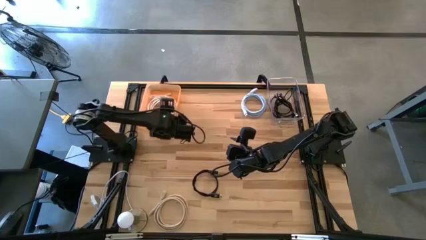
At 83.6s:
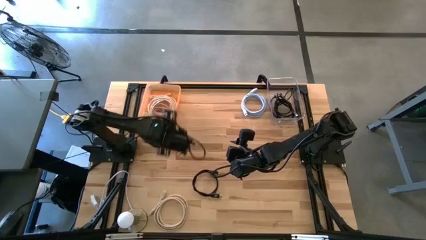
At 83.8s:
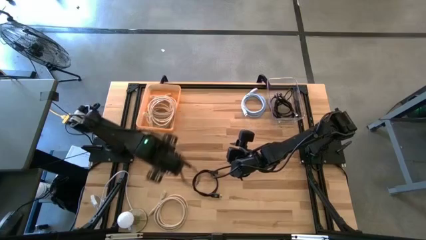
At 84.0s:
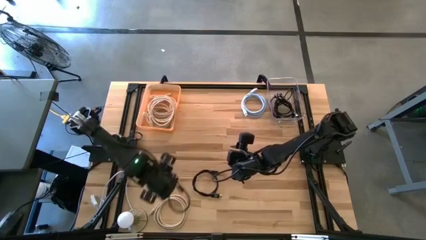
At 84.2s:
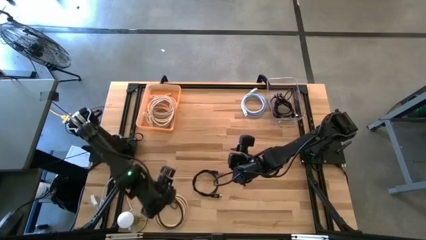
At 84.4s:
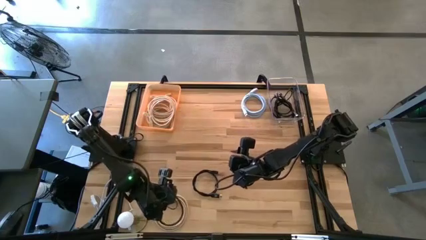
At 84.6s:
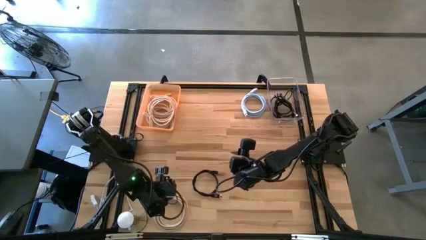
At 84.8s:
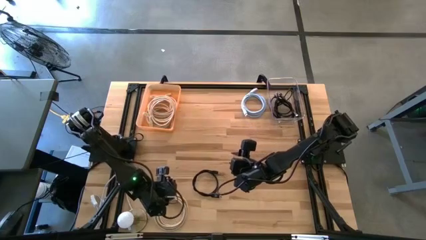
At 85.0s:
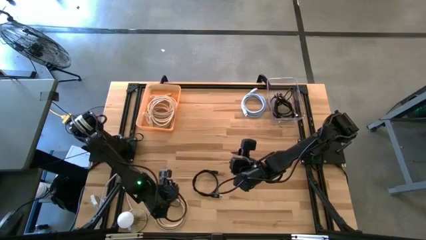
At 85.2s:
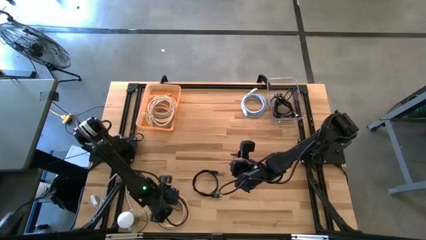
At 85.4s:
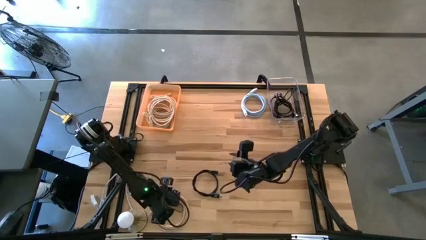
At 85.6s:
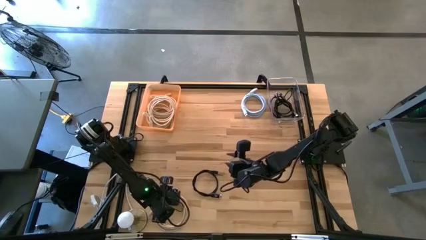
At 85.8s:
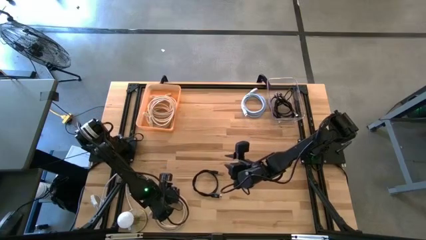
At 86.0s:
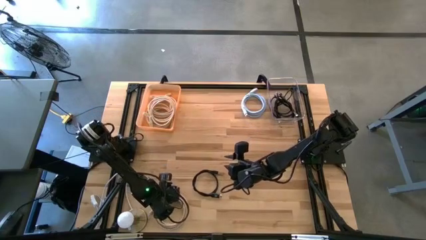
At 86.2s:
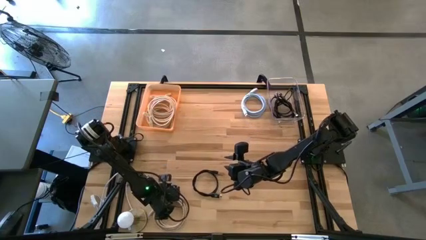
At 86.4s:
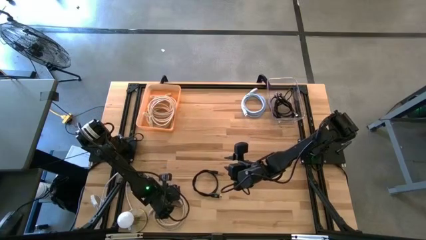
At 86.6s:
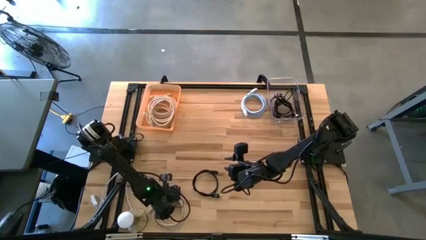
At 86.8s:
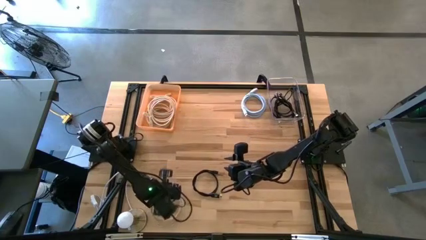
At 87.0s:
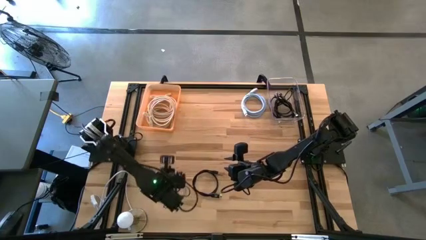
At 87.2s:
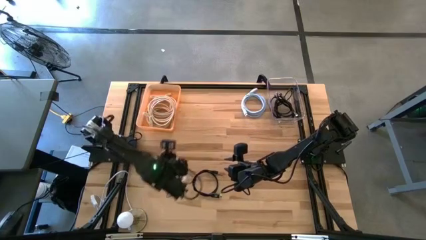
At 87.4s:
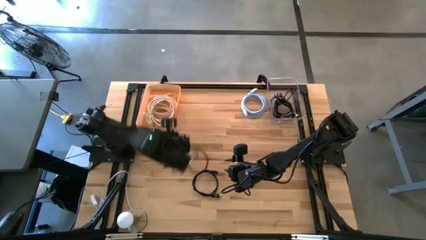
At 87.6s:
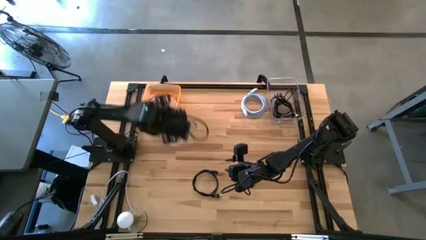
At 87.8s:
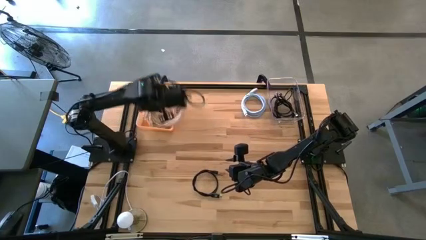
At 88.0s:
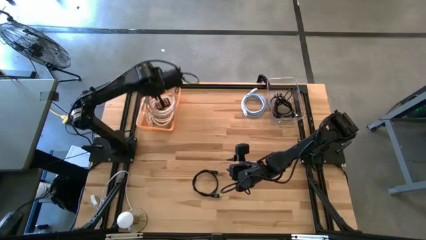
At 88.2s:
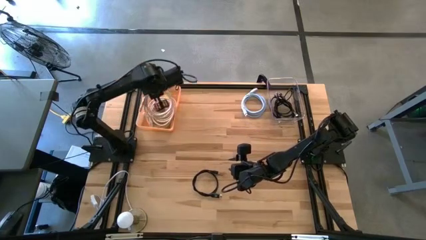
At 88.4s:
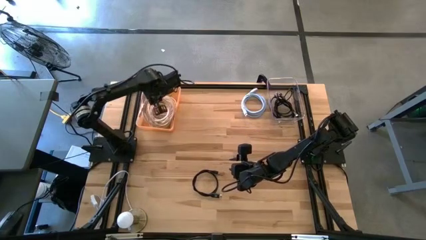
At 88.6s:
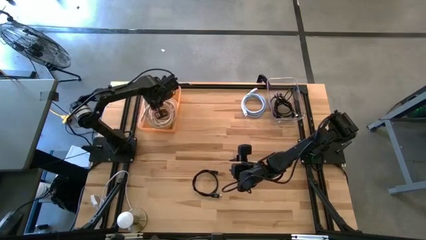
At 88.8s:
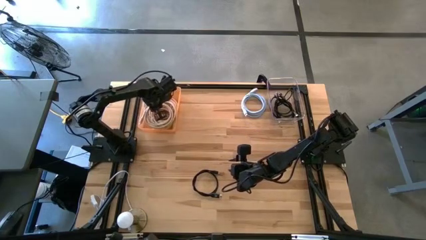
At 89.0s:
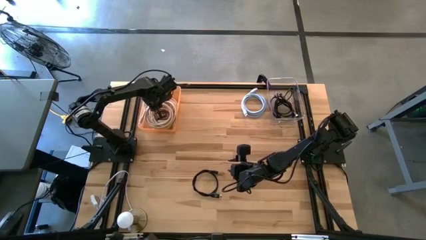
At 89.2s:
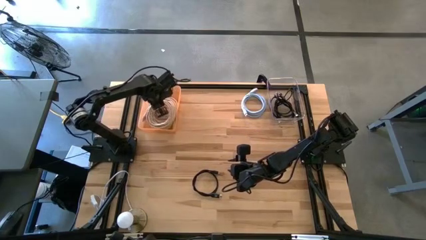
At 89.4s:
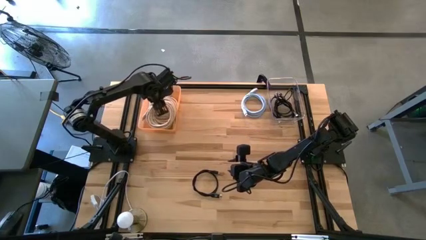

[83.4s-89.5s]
Task: Sort HDMI cables
Put the brown HDMI cable into the orange bin

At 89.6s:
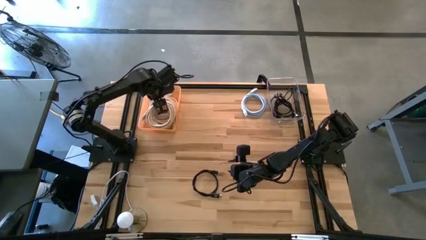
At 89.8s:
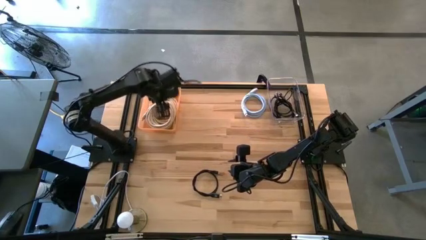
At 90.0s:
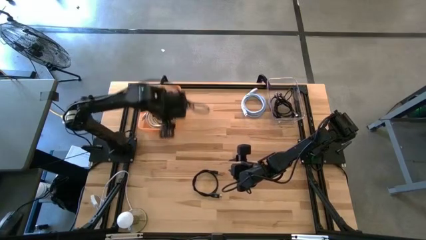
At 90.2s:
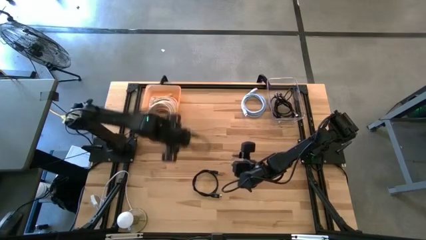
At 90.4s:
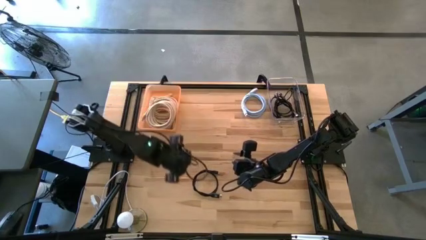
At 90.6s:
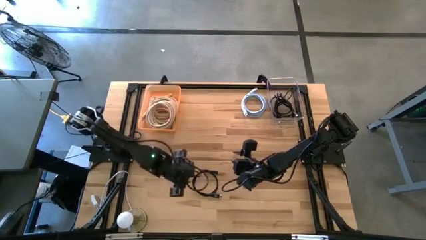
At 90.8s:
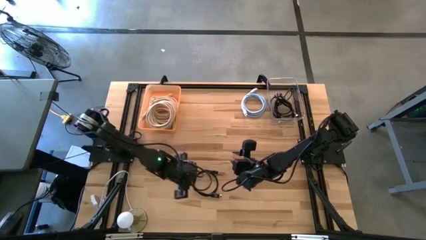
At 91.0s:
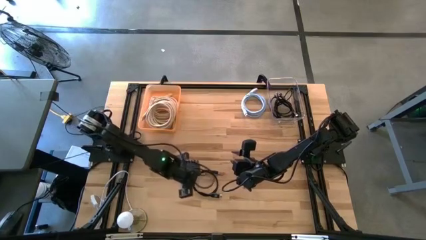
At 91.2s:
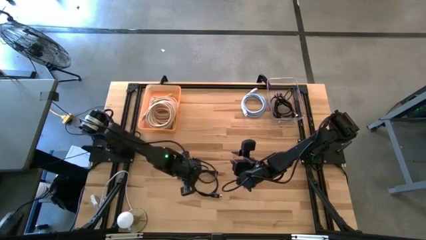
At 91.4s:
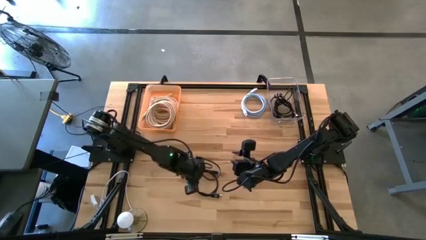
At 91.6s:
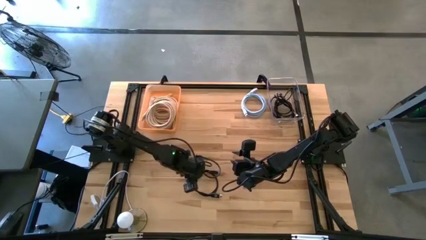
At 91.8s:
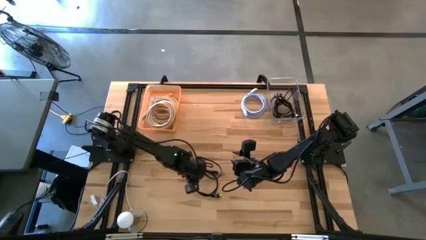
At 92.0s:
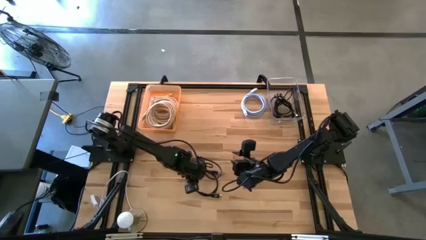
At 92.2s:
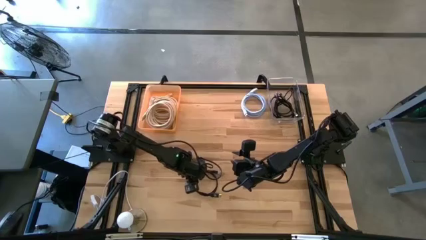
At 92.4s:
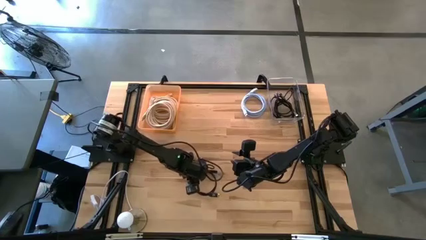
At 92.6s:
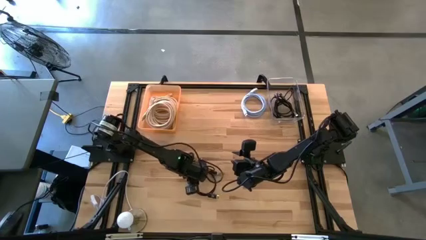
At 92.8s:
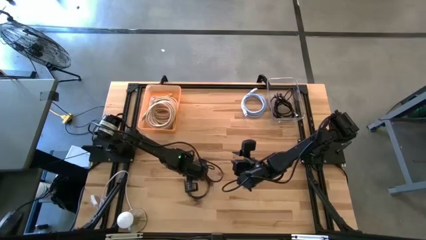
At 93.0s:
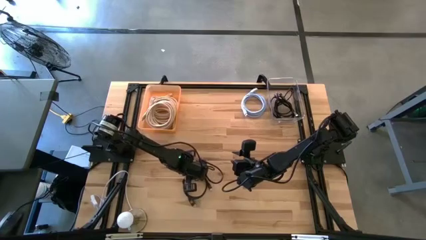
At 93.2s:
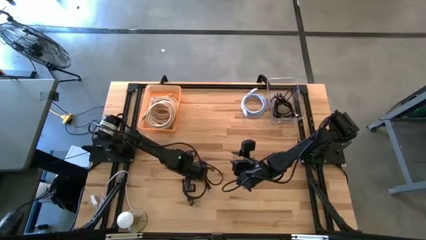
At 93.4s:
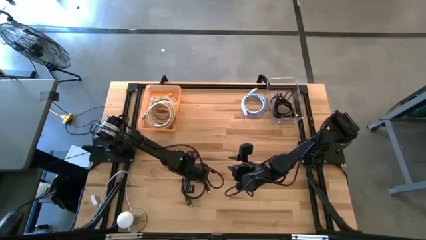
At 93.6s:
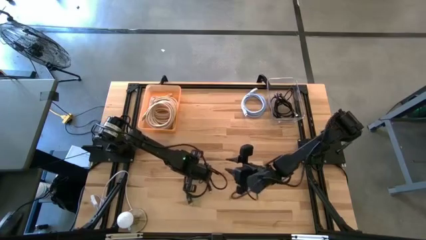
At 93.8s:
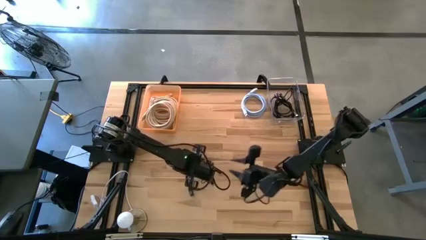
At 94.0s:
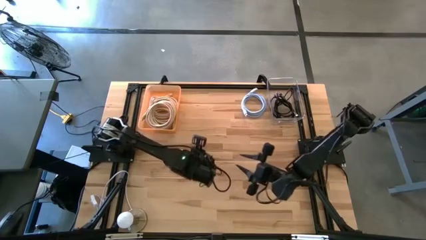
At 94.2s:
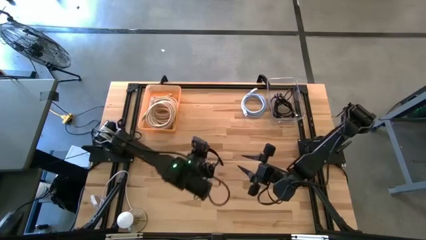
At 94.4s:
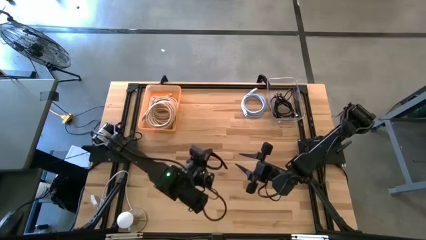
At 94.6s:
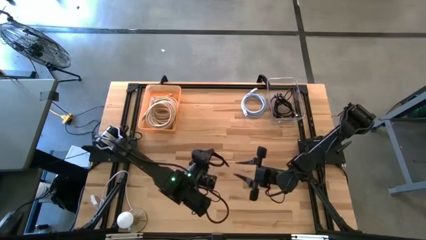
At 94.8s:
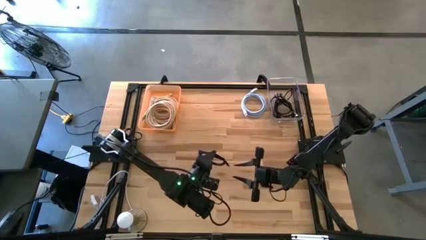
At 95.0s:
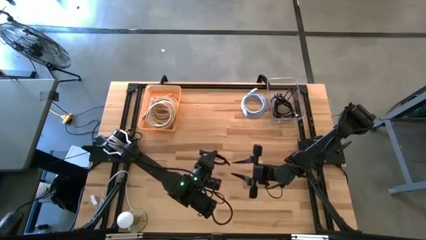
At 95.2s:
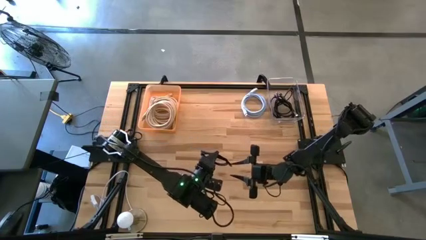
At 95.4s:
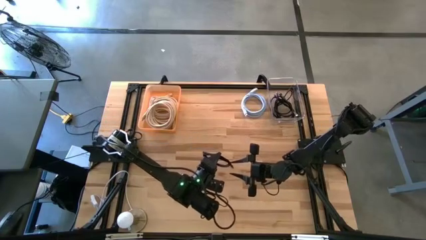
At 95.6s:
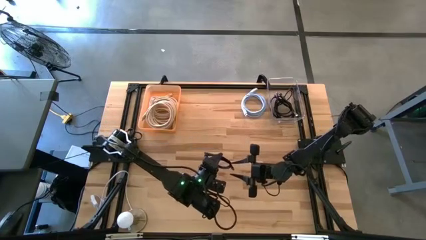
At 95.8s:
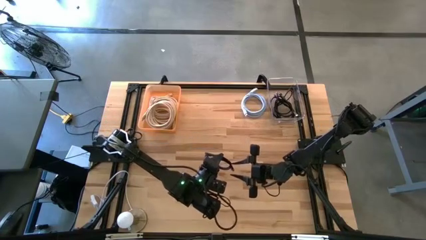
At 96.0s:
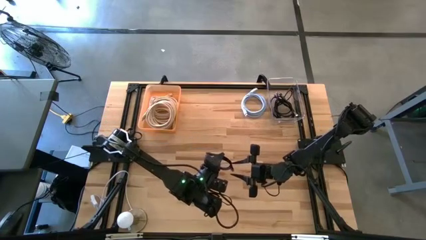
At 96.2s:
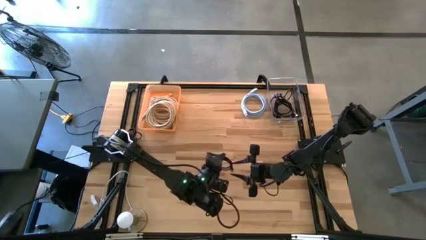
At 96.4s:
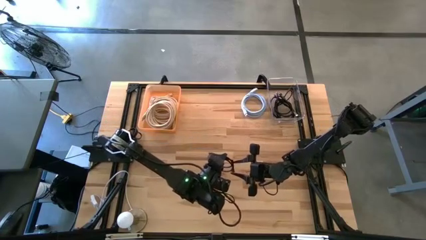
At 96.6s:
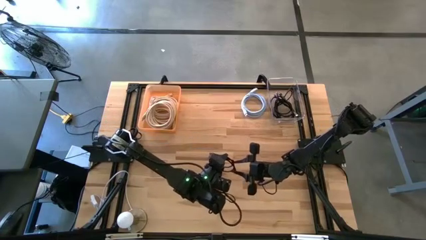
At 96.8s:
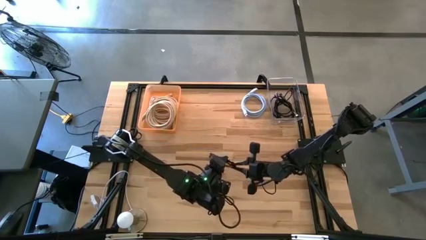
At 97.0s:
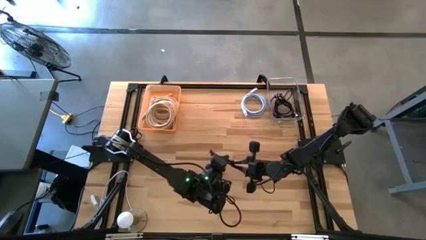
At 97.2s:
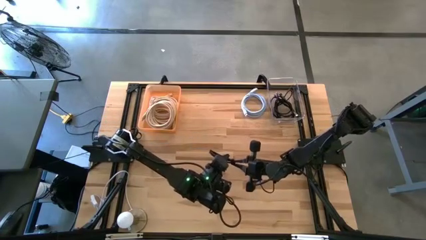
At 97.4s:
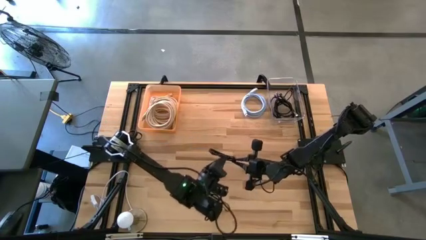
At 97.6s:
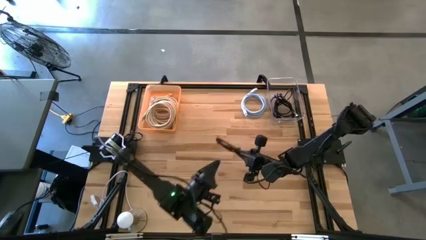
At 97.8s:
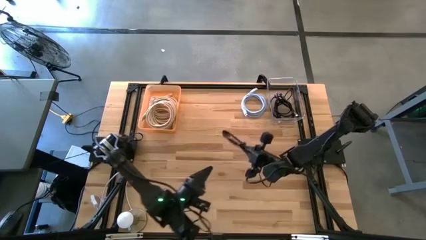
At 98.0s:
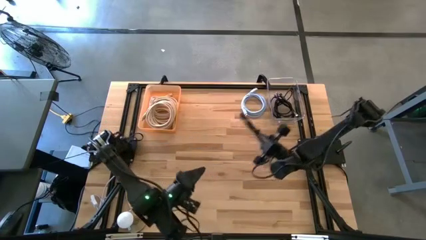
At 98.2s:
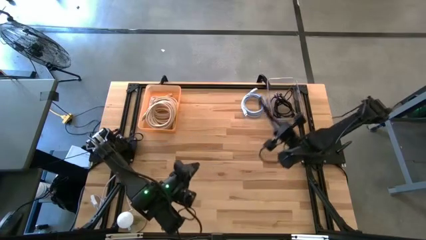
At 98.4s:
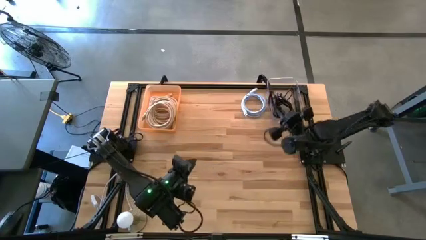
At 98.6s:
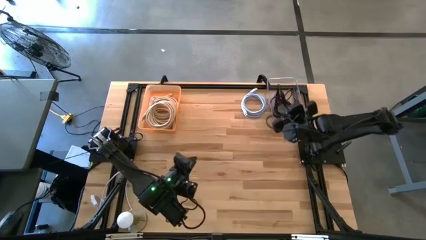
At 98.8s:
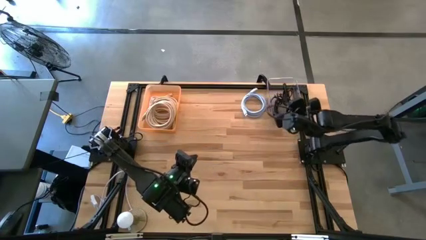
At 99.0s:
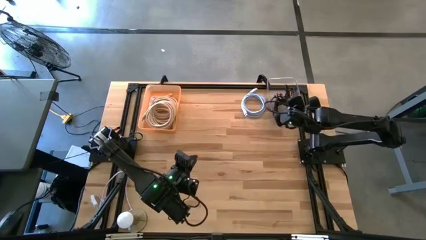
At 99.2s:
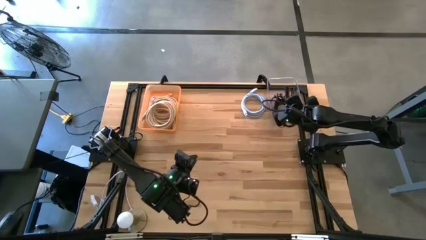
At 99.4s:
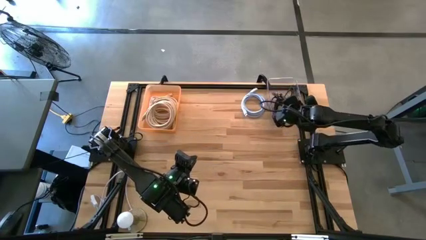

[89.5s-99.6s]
Put the black HDMI cable into the transparent bin

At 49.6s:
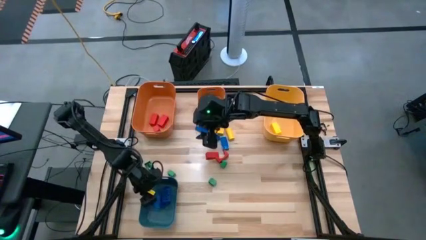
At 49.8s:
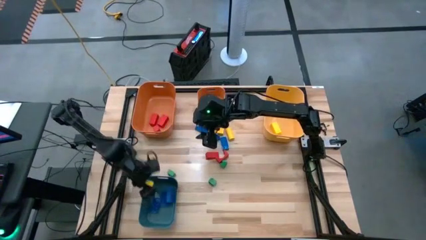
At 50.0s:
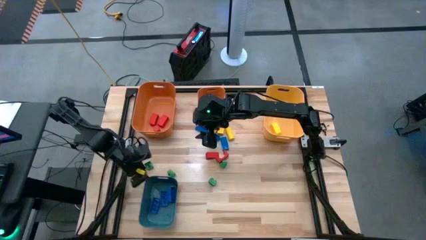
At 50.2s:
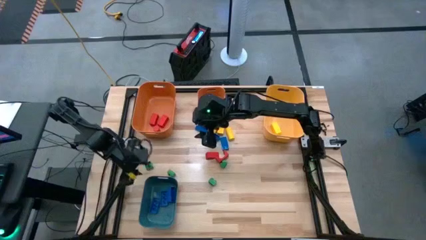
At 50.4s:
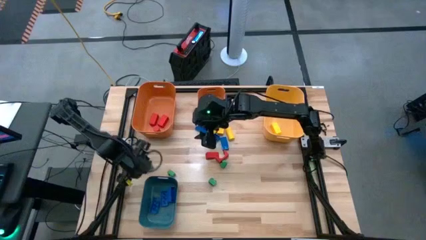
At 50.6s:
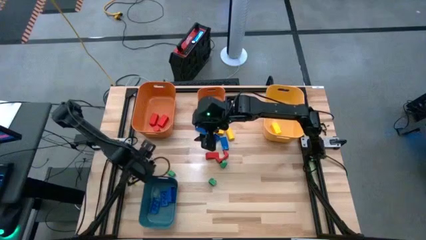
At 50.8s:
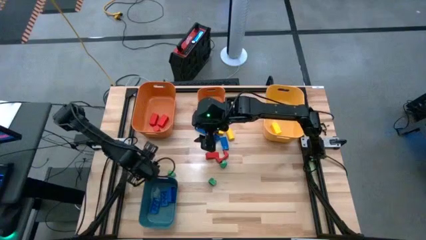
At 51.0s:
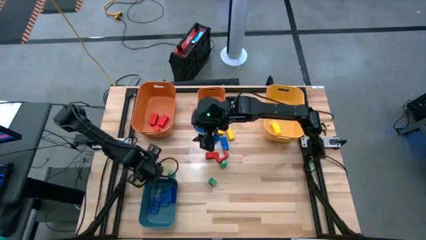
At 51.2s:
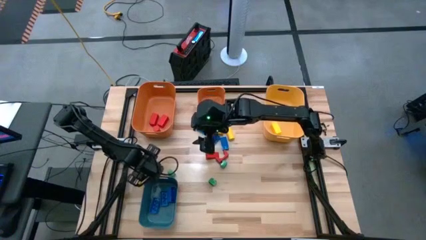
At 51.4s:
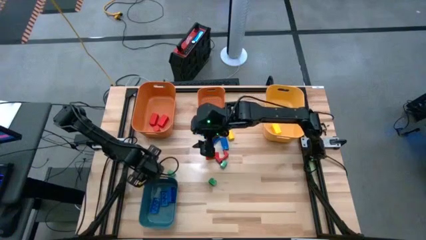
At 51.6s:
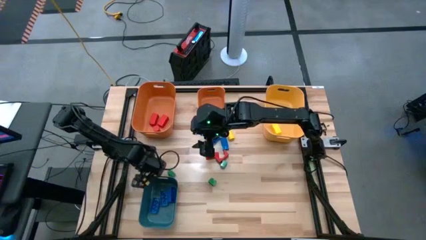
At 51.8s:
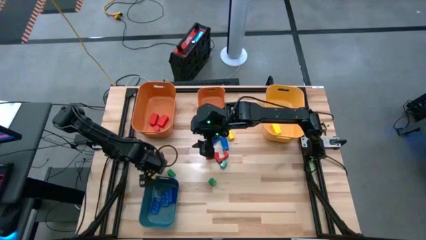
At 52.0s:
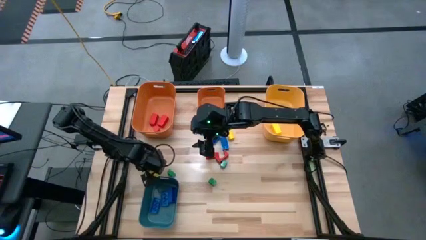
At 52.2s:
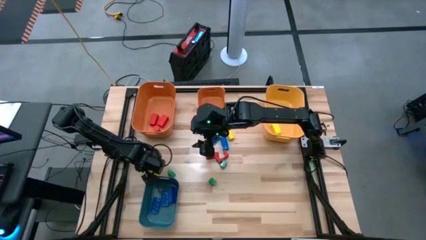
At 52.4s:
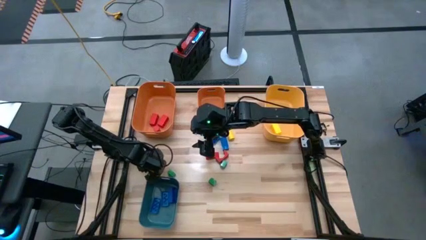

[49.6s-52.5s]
Task: Sort blocks
Put the green game piece into the right orange bin
